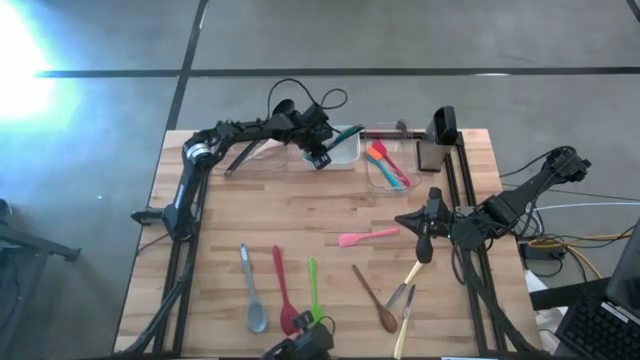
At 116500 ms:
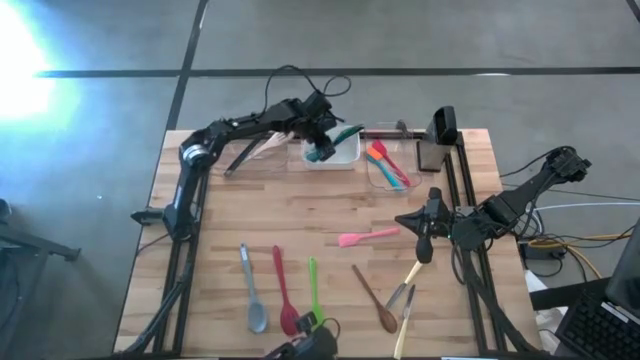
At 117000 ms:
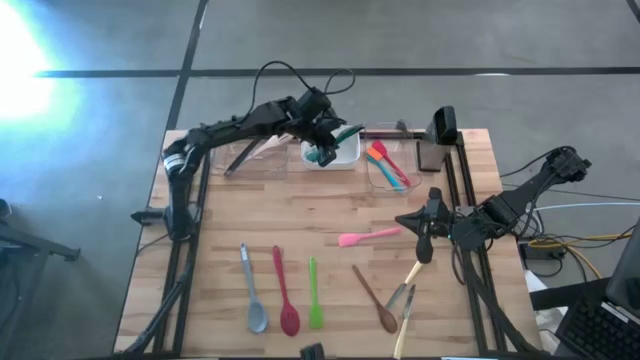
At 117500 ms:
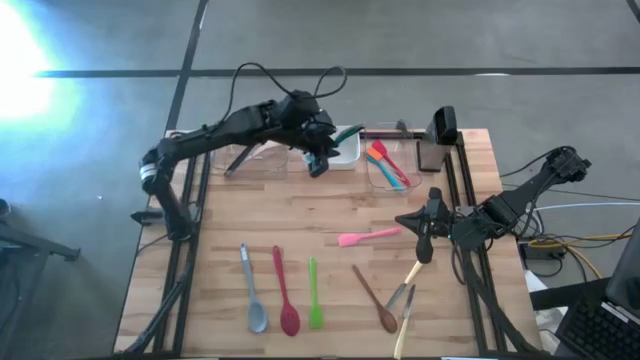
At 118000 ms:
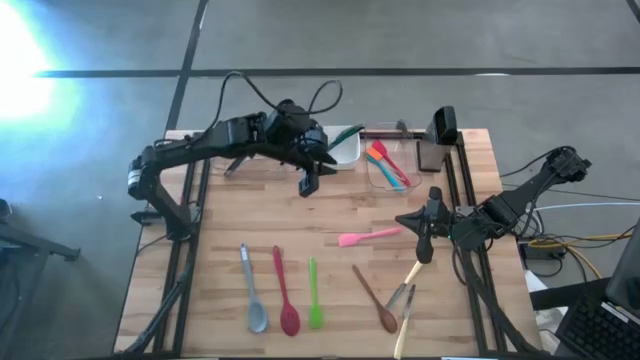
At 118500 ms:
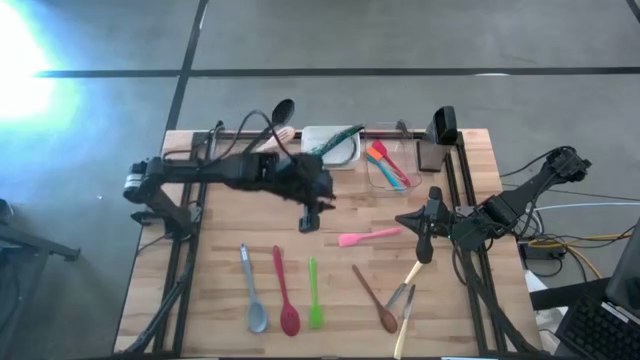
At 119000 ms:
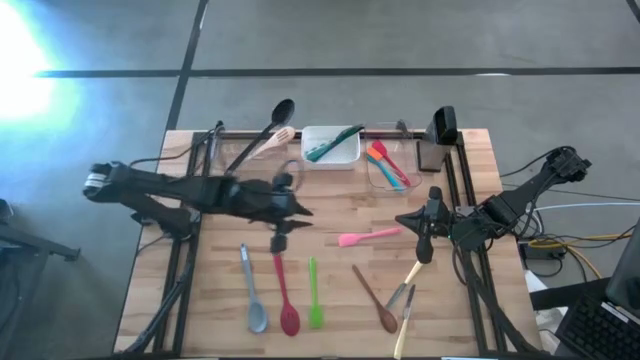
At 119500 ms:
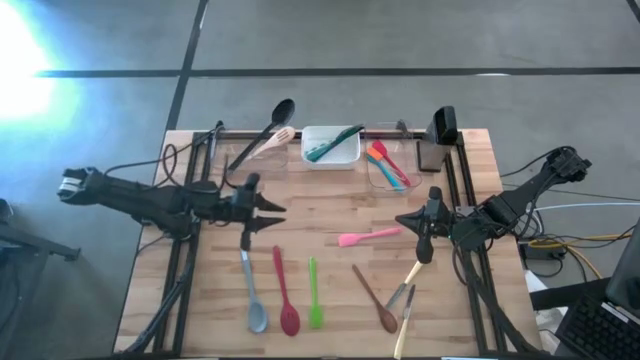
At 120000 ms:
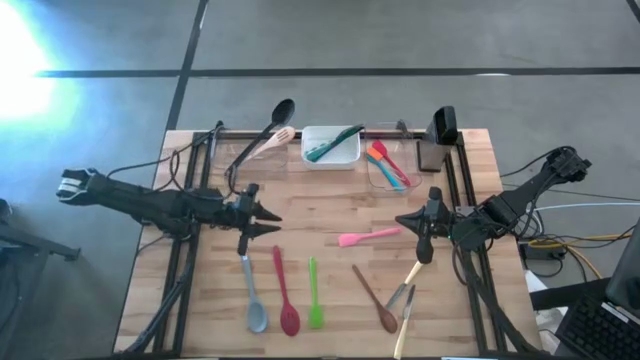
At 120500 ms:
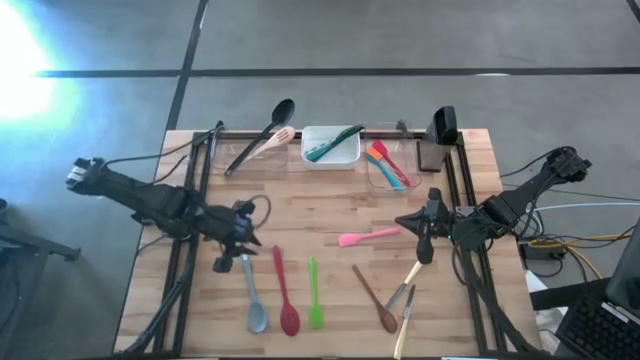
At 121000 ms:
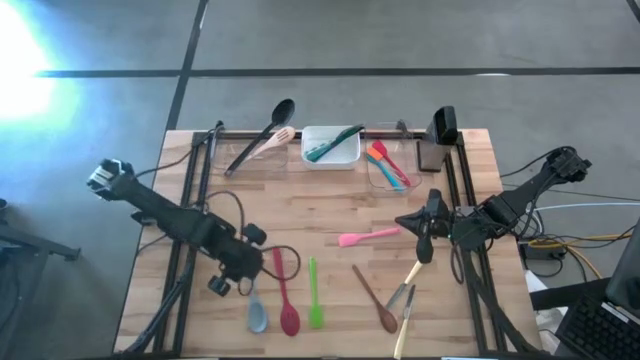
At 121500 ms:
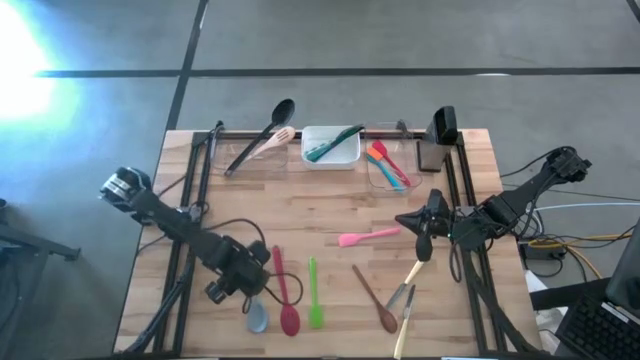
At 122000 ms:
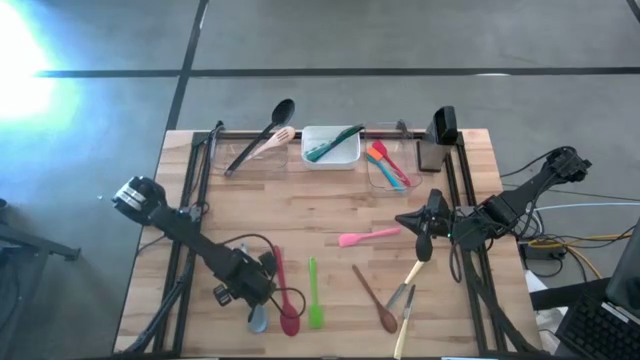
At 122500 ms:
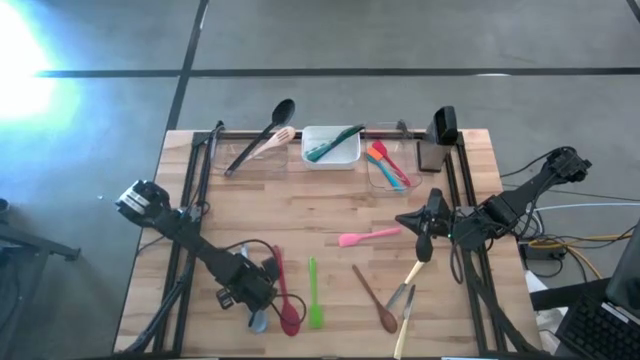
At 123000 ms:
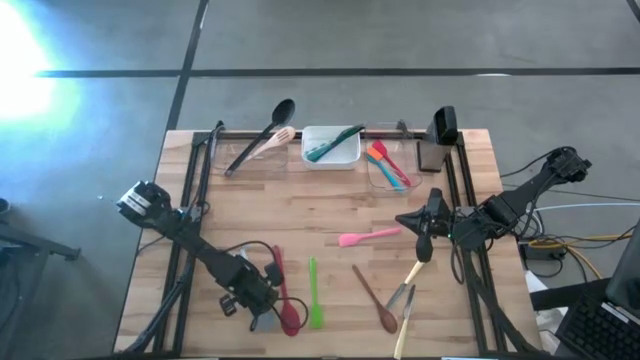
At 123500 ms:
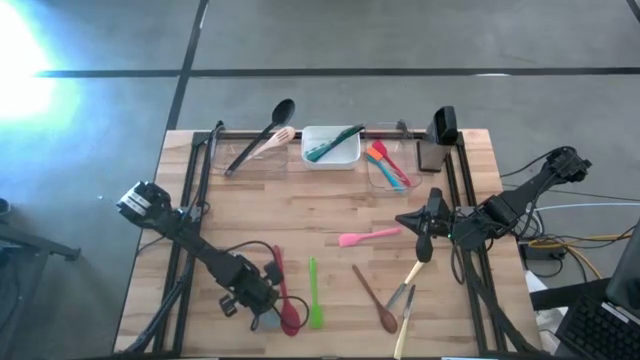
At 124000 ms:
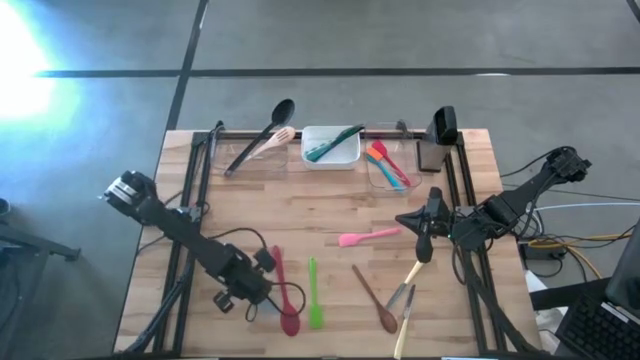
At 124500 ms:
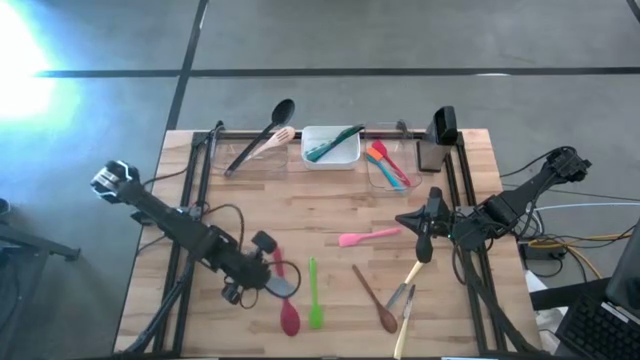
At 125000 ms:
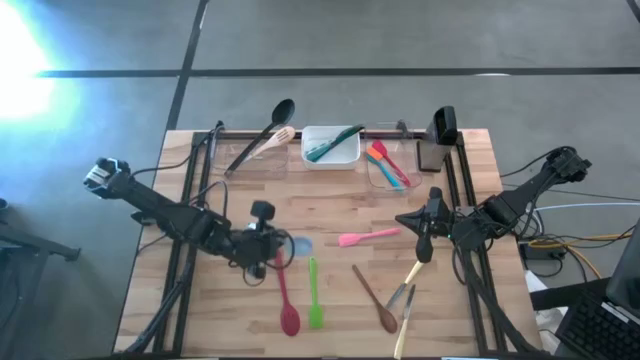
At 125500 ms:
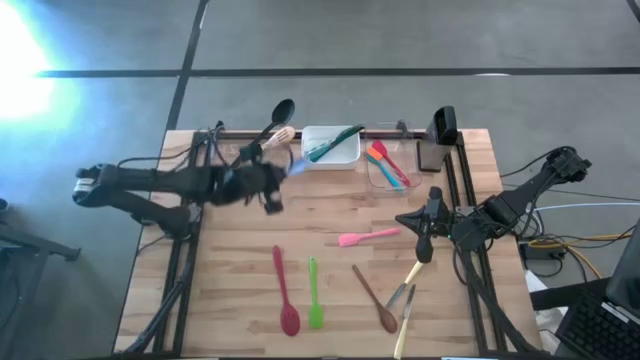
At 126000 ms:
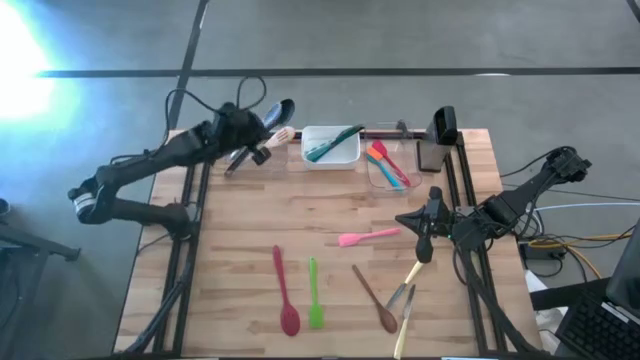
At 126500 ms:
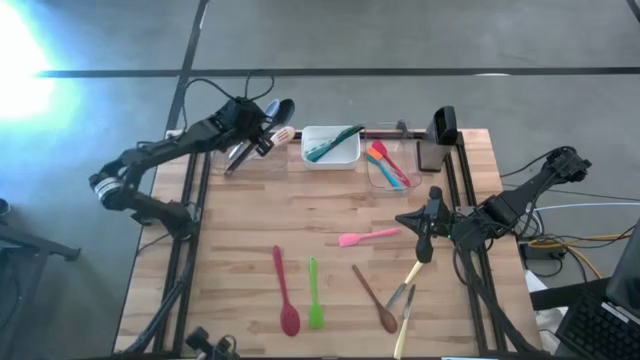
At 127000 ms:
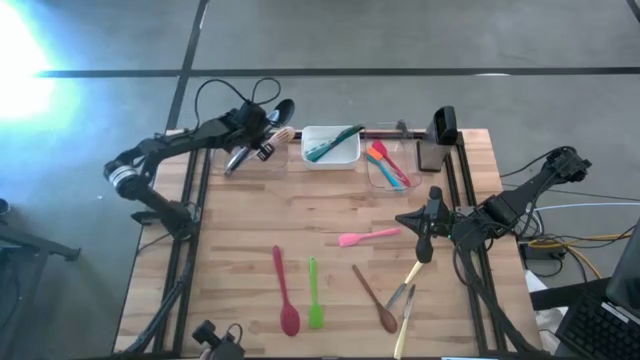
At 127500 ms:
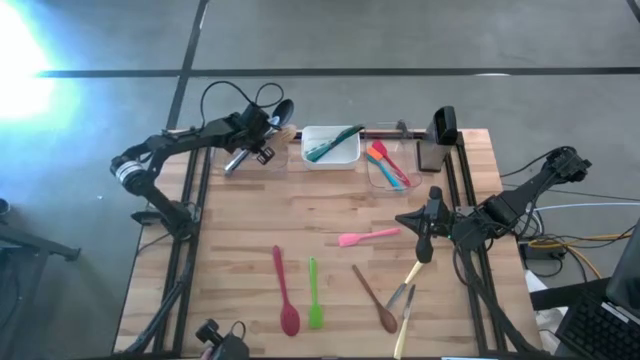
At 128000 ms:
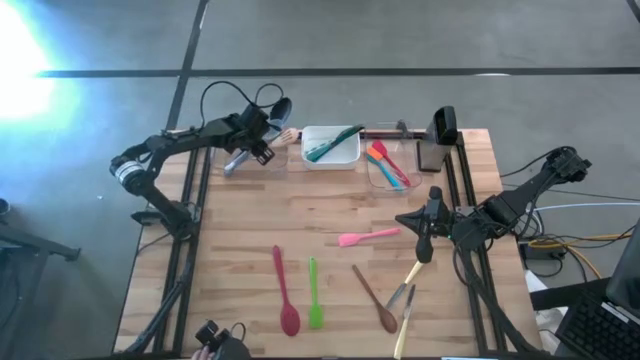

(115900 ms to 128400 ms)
Task: Pick & Place Kitchen Items
Put the light blue serving spoon into the left transparent bin

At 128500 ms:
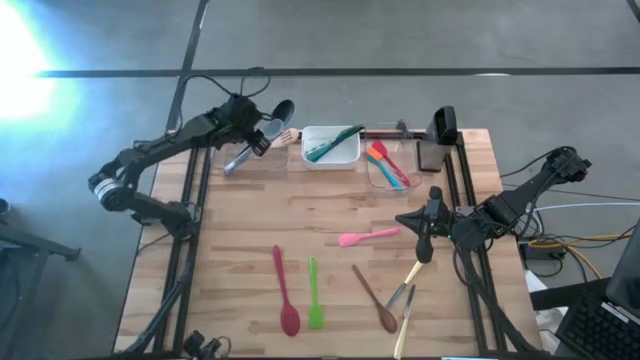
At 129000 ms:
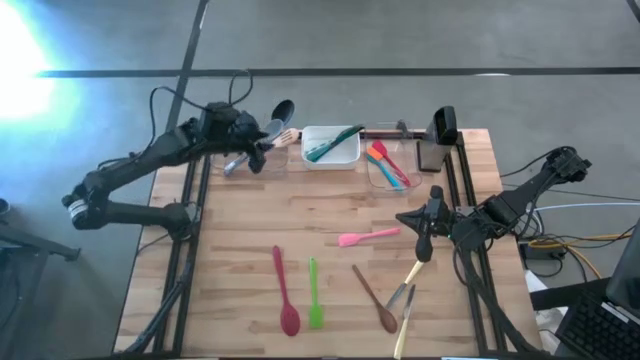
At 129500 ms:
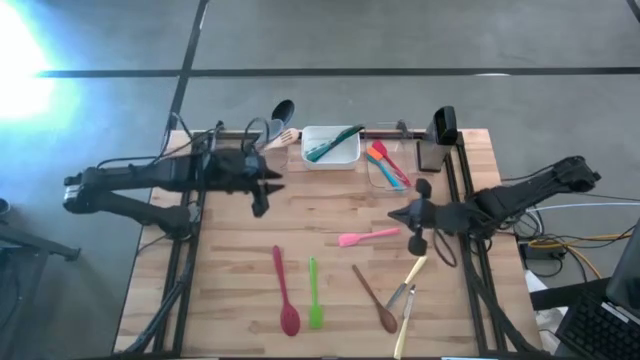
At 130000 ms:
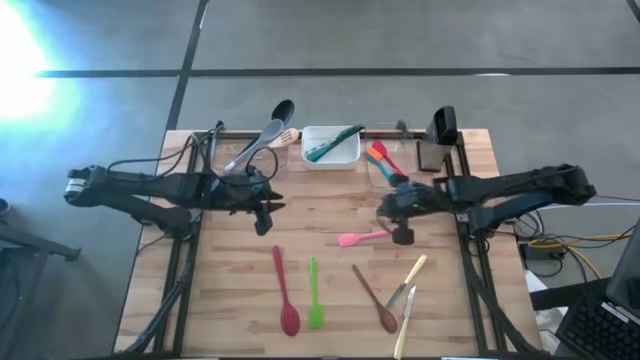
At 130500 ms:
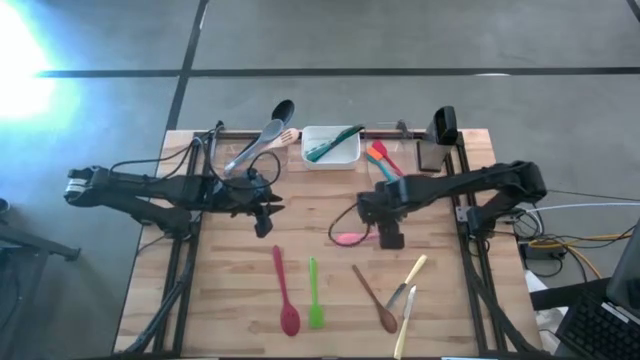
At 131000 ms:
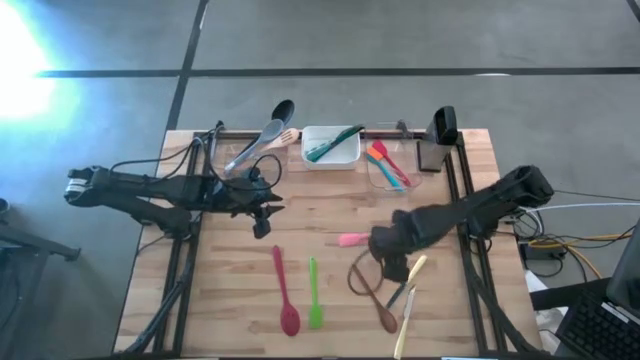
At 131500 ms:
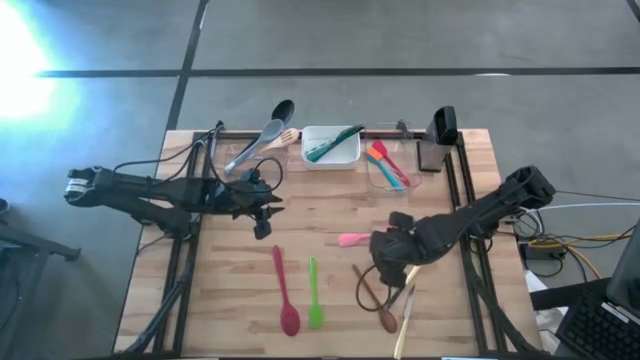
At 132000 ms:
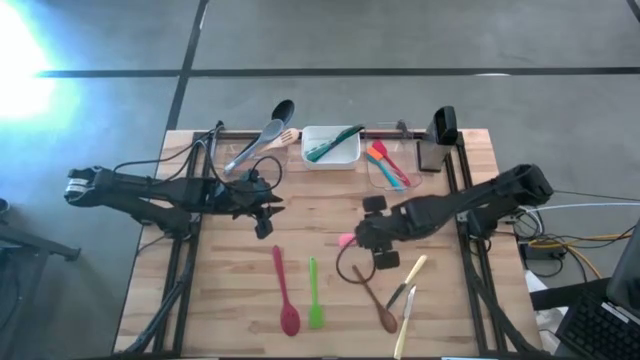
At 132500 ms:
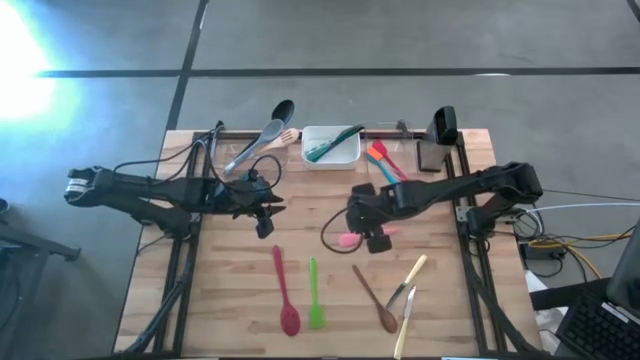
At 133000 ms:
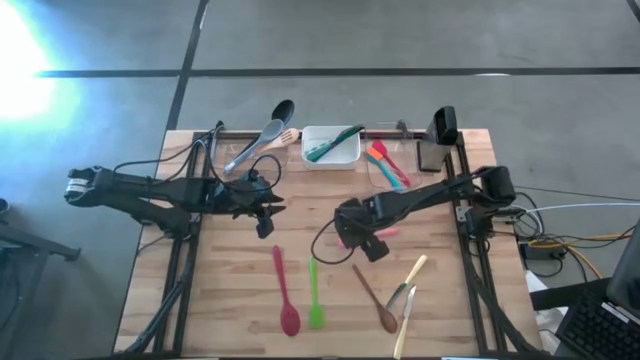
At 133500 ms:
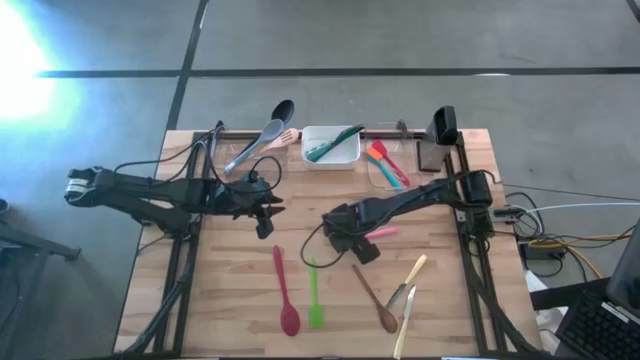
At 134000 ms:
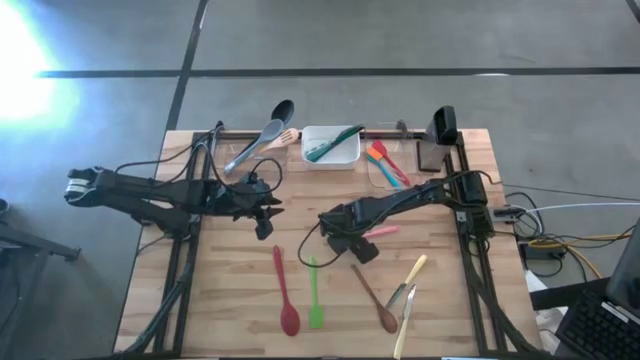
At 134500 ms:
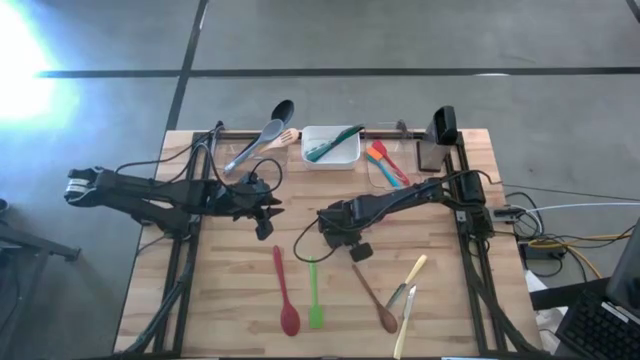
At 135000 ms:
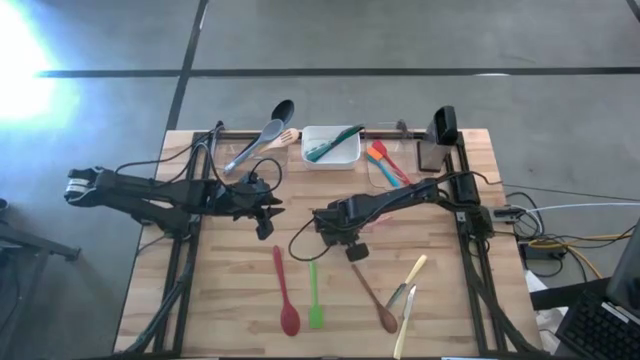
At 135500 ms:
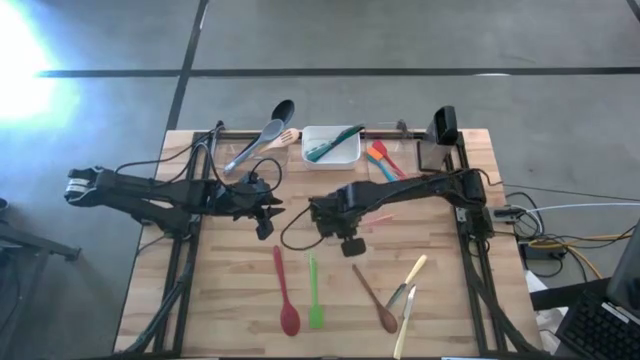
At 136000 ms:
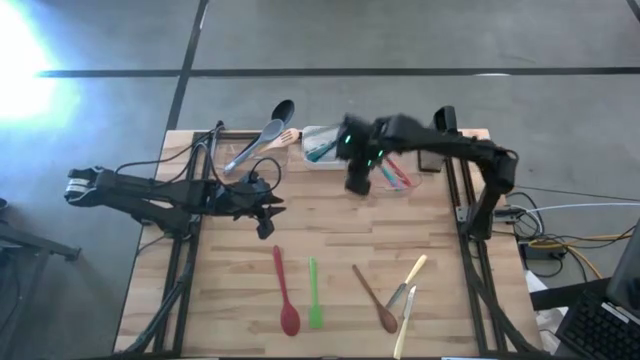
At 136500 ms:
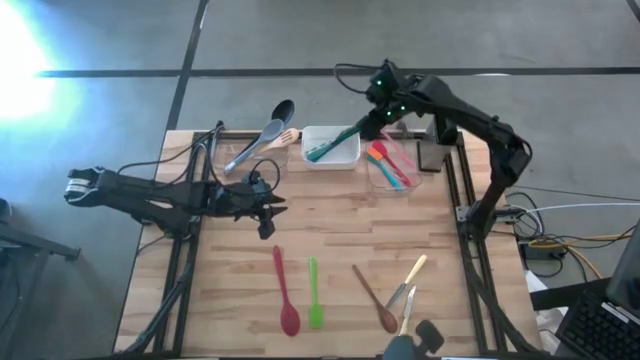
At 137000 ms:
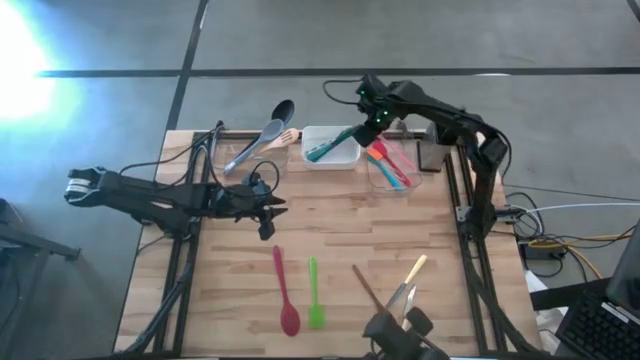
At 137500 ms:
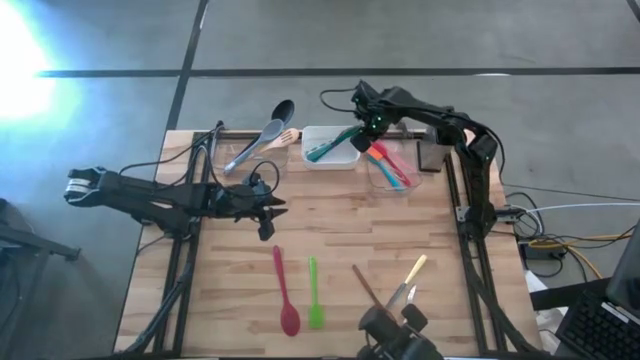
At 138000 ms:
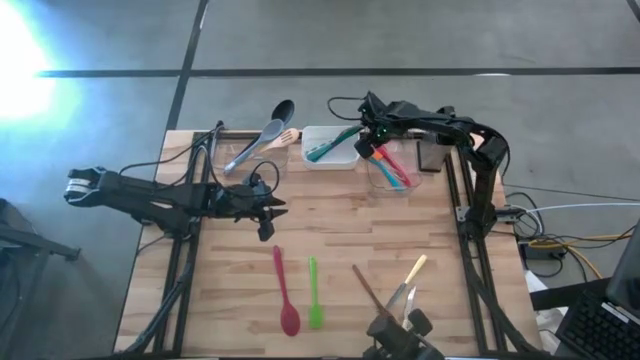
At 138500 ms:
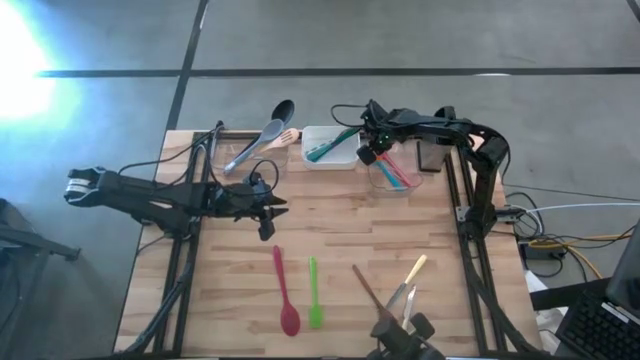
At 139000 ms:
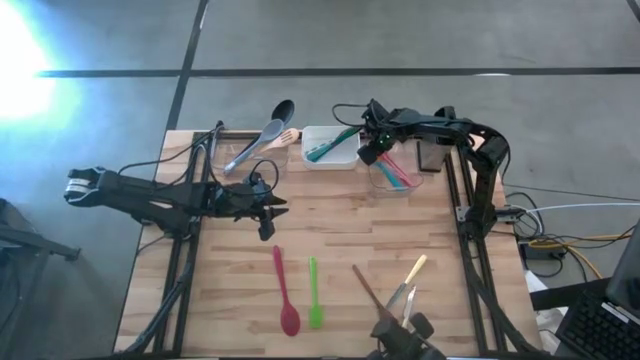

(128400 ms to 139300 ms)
Put the pink spatula into the right transparent bin
